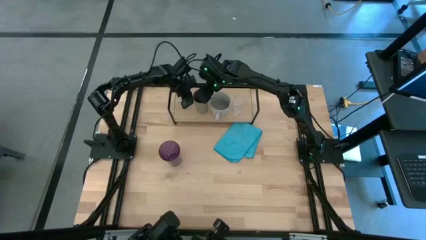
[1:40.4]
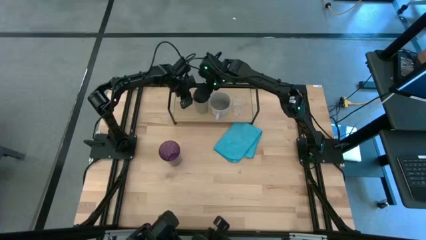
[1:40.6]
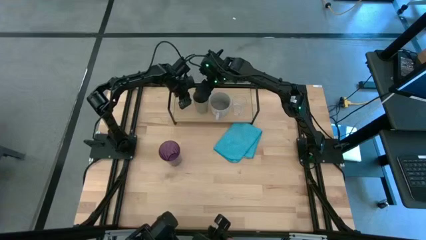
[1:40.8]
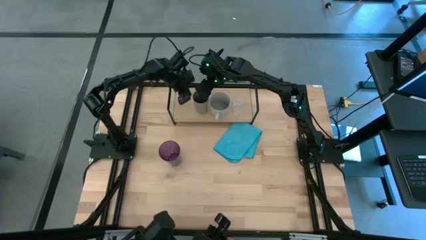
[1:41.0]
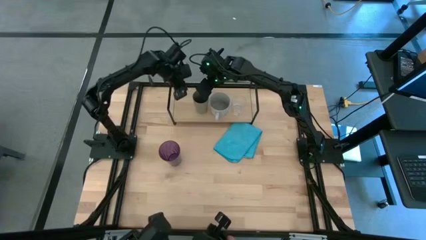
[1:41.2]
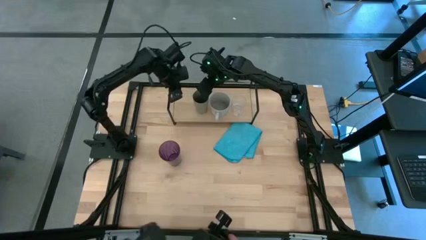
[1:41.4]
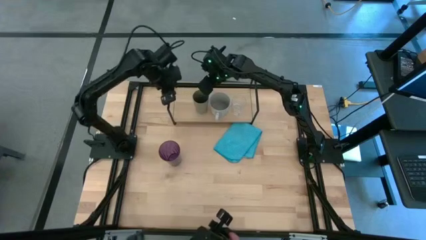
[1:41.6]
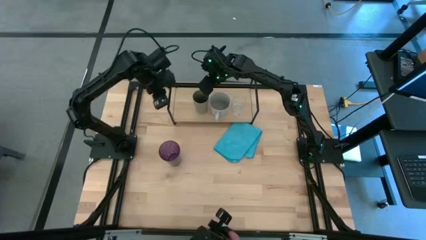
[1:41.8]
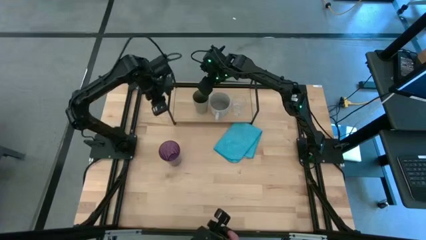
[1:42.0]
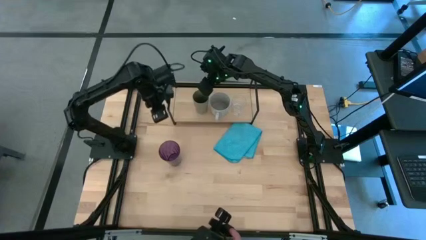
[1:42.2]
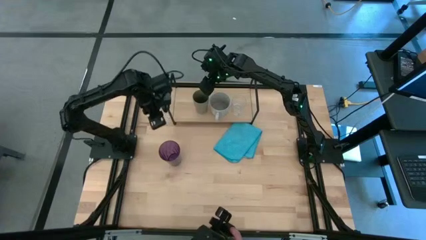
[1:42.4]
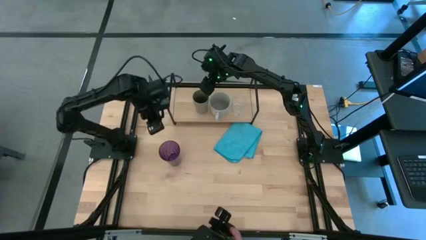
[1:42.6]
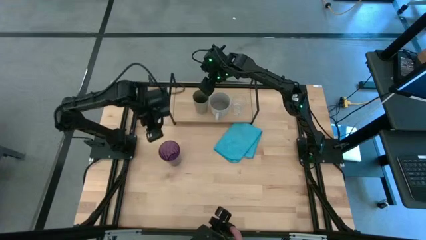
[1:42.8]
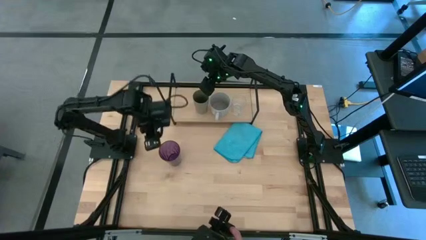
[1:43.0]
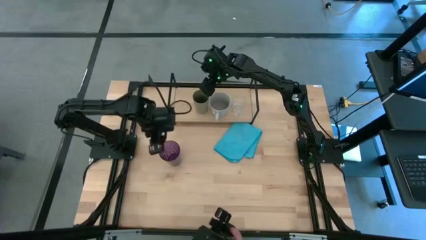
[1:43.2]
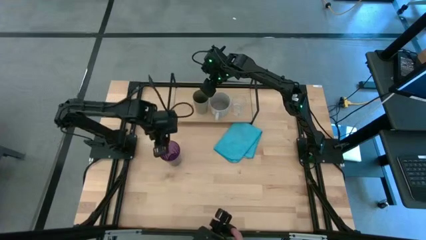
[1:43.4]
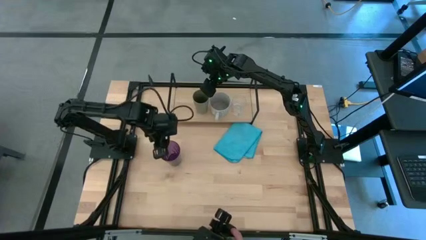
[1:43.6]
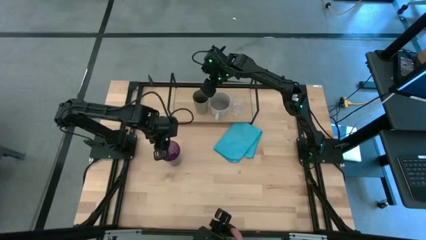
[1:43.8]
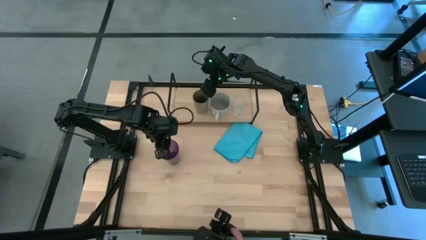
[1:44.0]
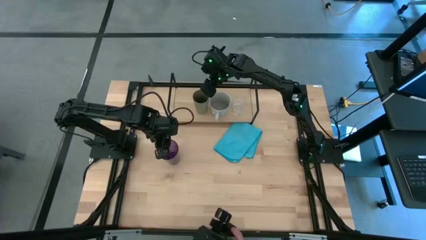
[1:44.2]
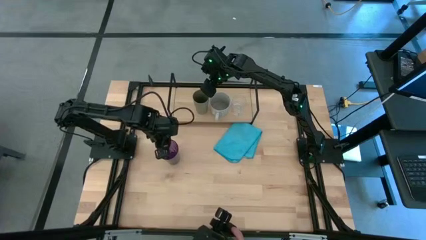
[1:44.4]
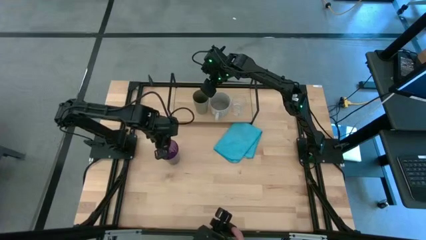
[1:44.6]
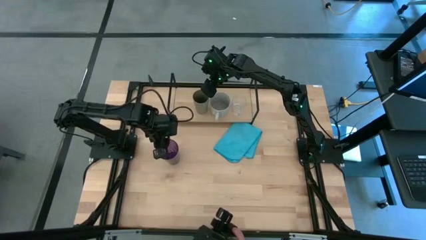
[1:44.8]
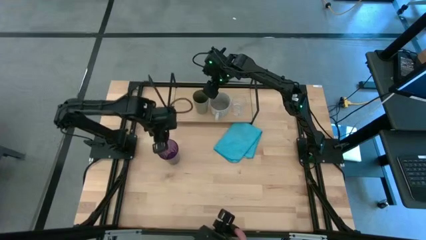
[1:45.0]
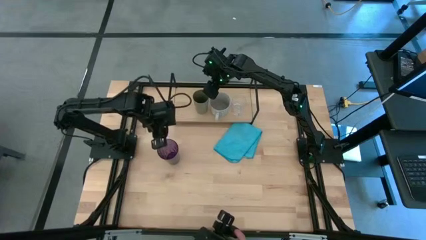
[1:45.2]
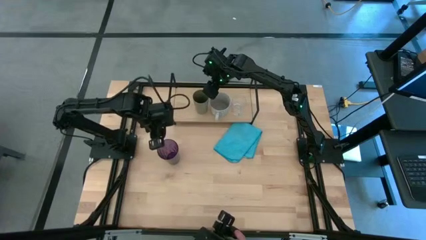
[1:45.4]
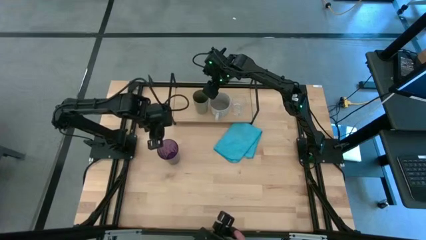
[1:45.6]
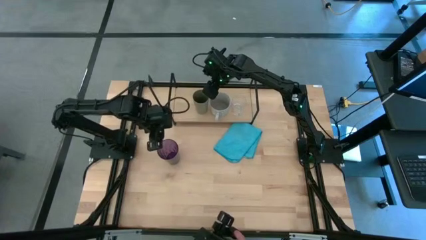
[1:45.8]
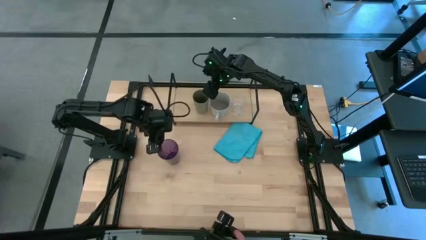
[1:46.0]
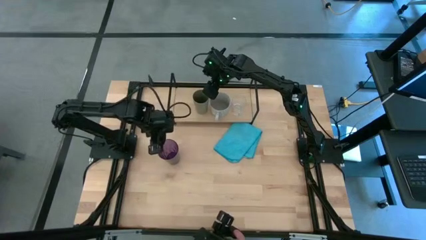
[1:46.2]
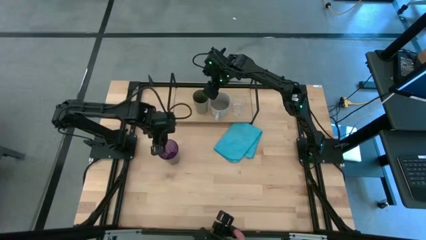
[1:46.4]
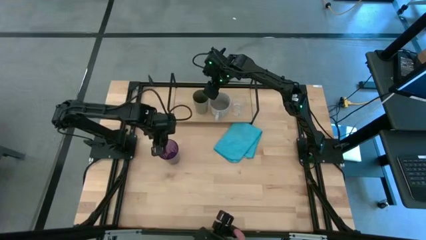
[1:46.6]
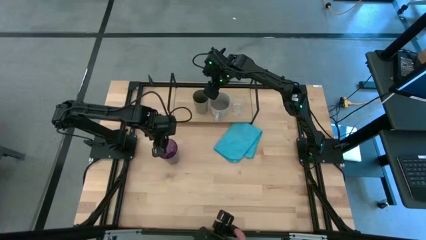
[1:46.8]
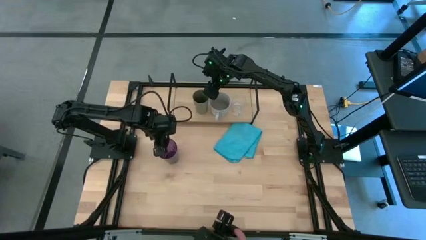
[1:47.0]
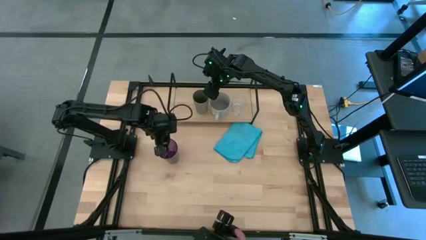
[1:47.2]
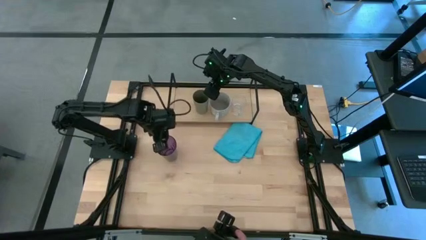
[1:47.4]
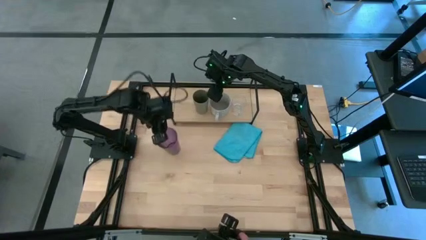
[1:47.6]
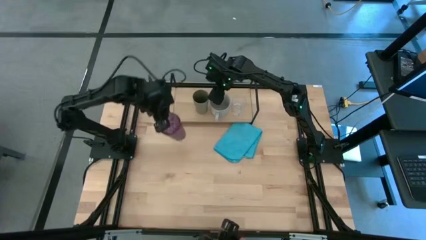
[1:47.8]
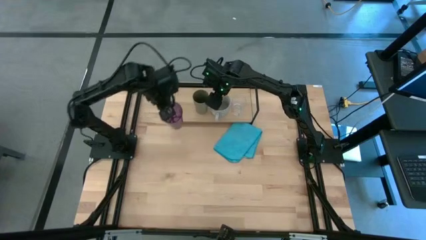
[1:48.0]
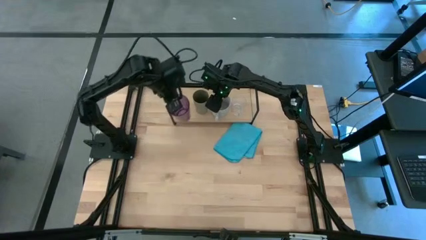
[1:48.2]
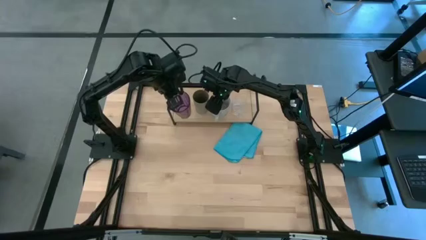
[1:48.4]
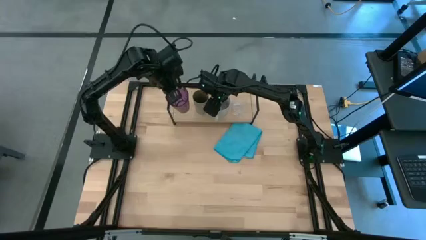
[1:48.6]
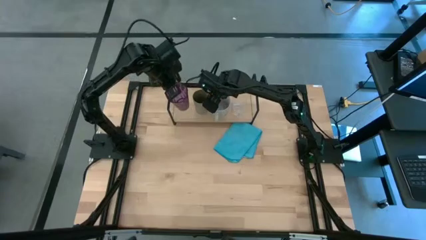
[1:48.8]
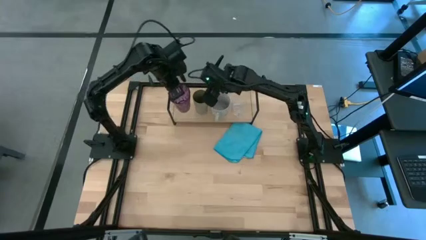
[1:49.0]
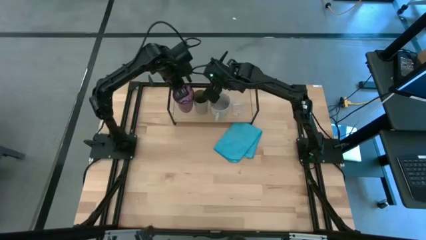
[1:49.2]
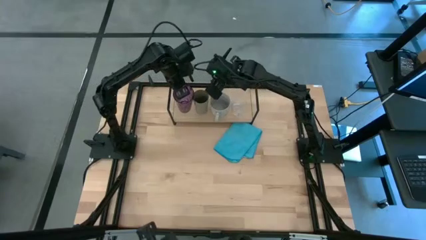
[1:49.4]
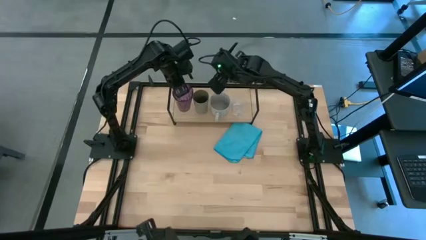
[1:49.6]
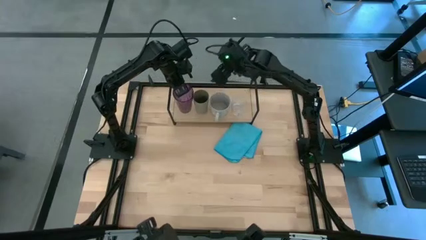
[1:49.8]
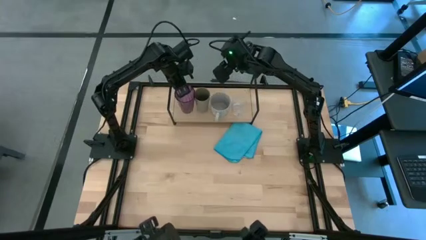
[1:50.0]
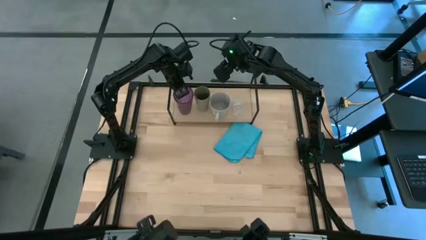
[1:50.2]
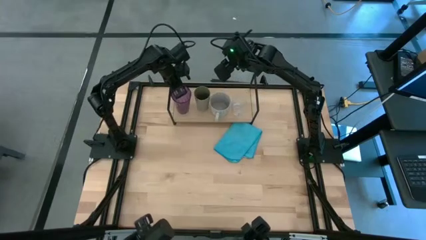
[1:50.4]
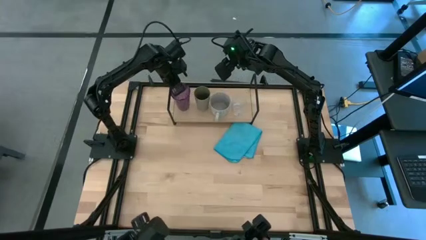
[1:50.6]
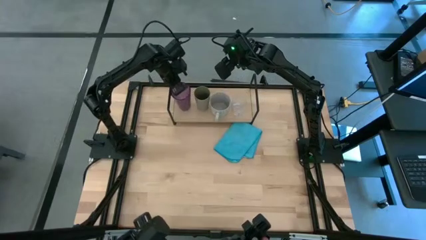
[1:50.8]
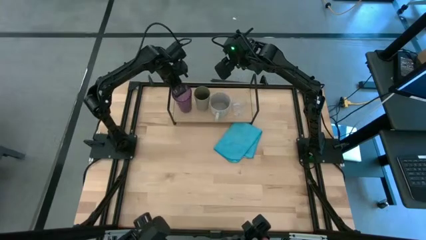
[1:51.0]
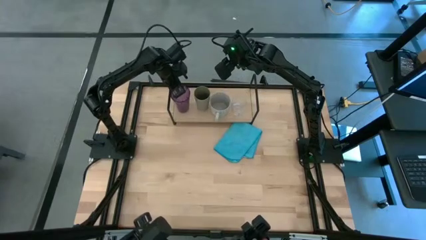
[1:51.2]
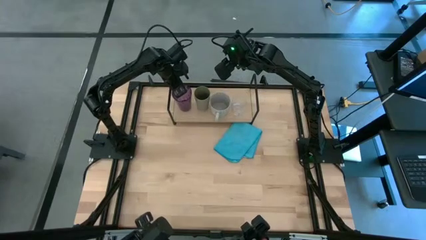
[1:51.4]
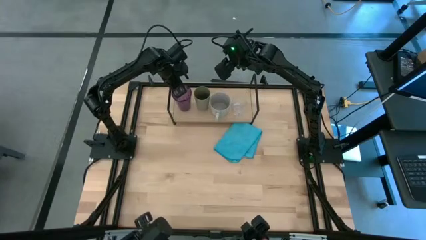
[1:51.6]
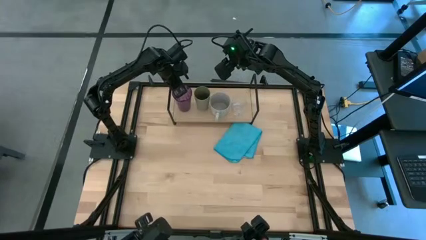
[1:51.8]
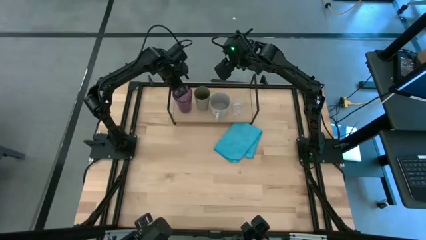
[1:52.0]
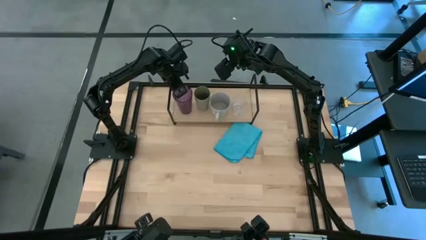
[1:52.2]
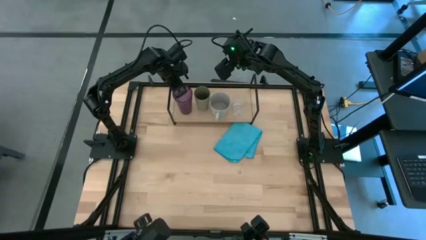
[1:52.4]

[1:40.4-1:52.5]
Task: Stack small to large cups/mugs on shelf
Put the violet cup on the shelf
